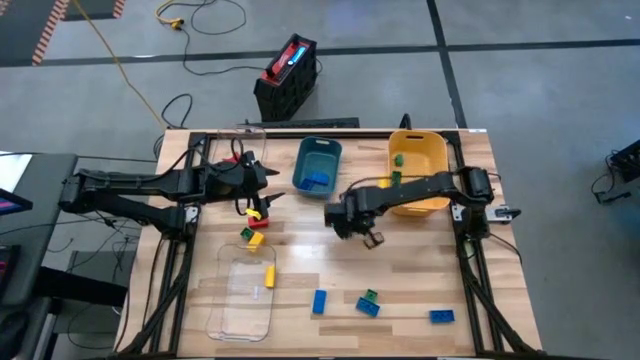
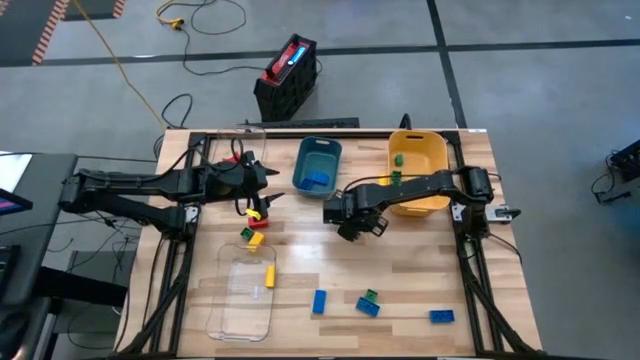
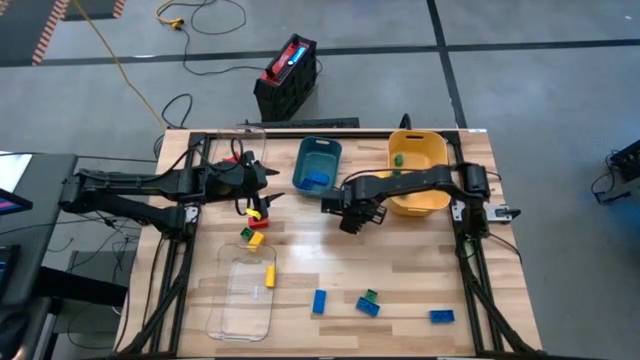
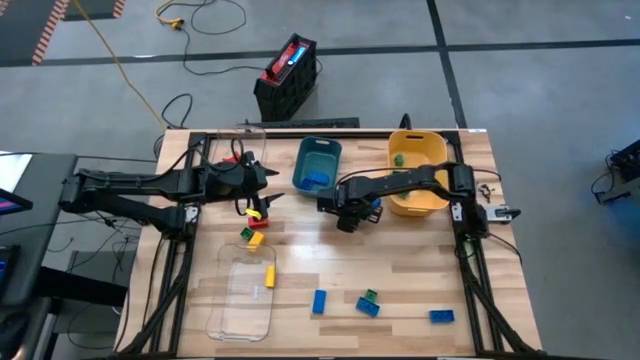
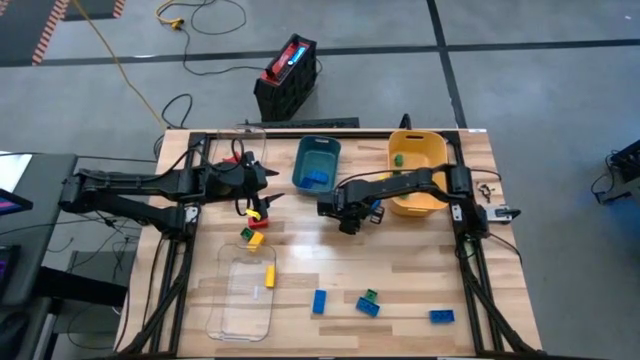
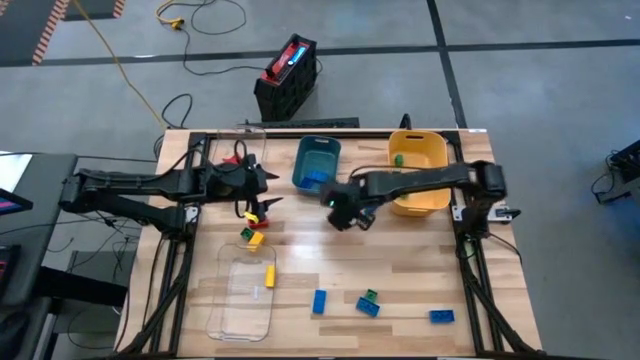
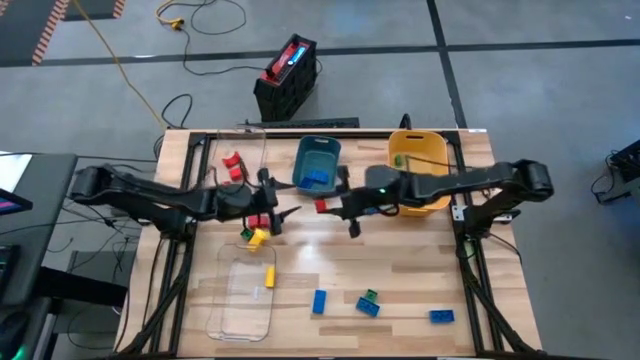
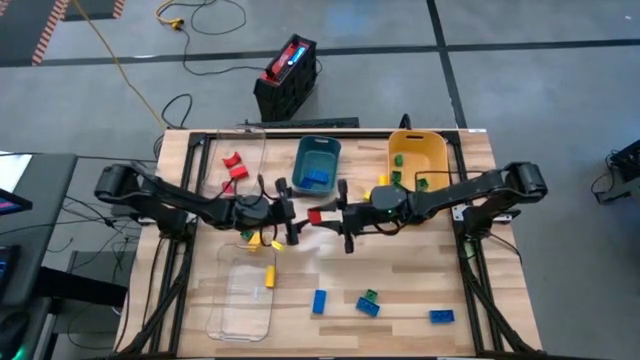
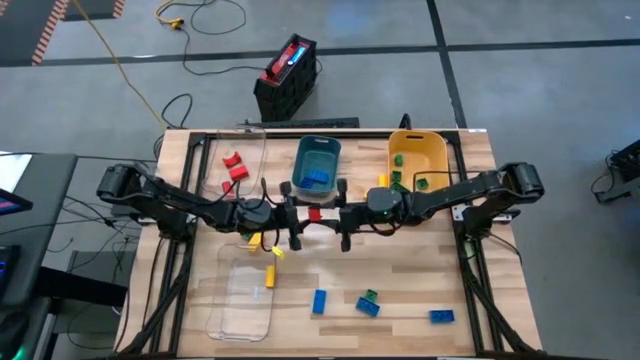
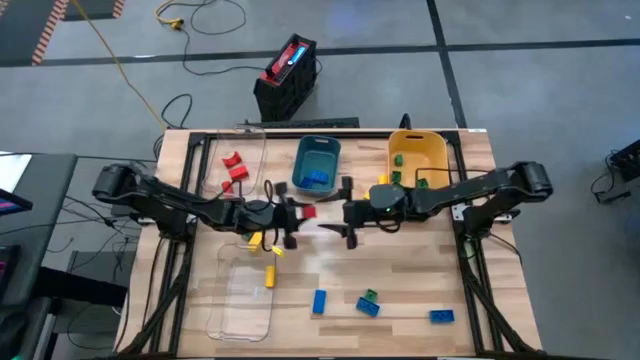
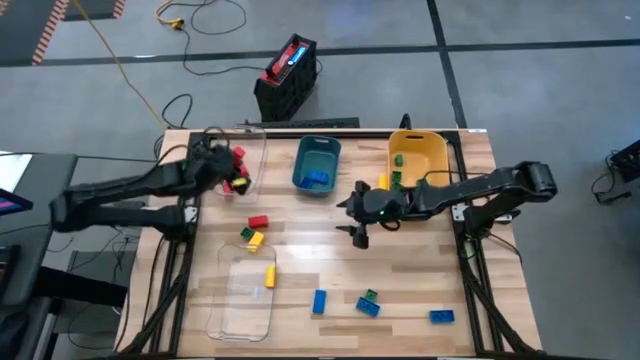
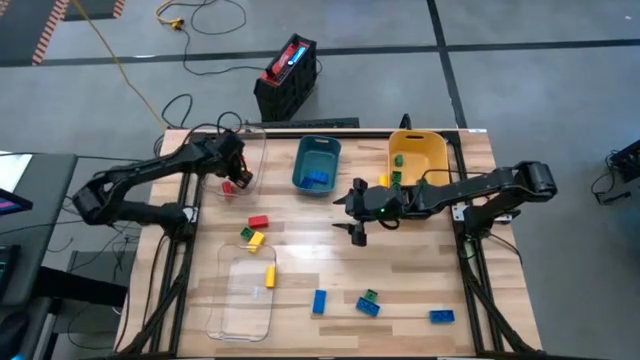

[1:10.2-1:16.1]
Task: Sort blocks
Put the red block into the top transparent bin

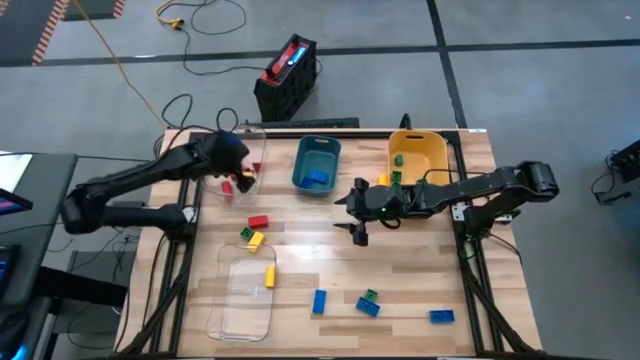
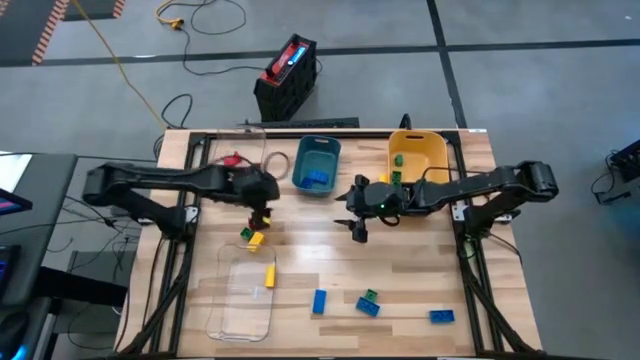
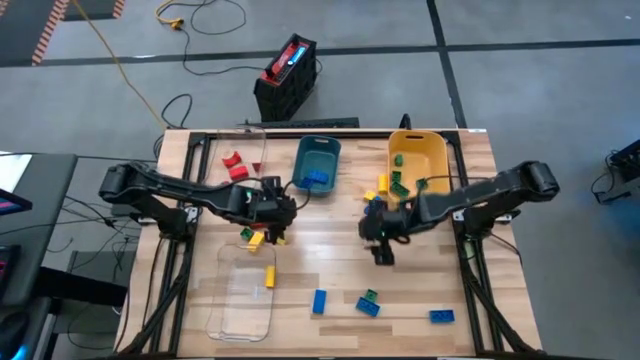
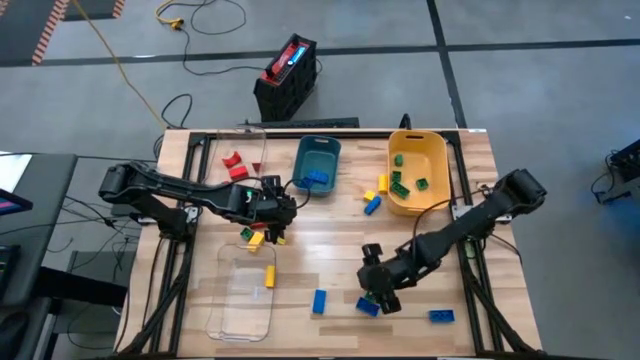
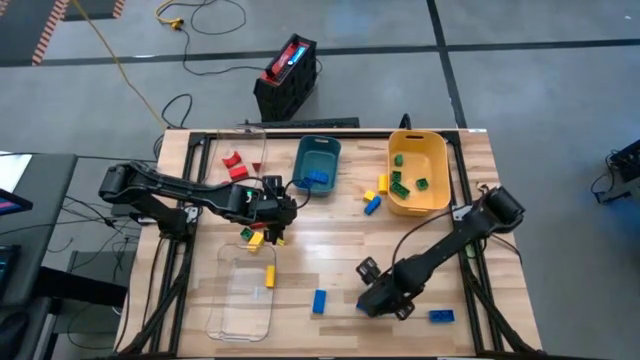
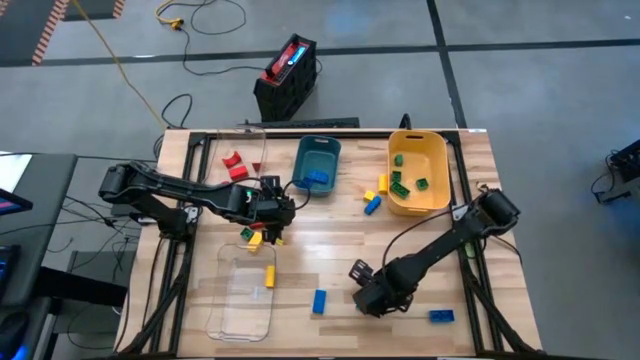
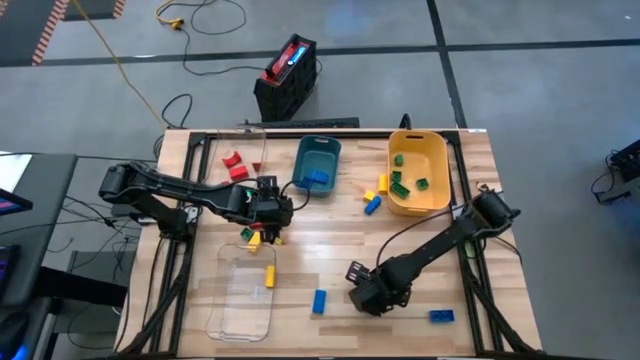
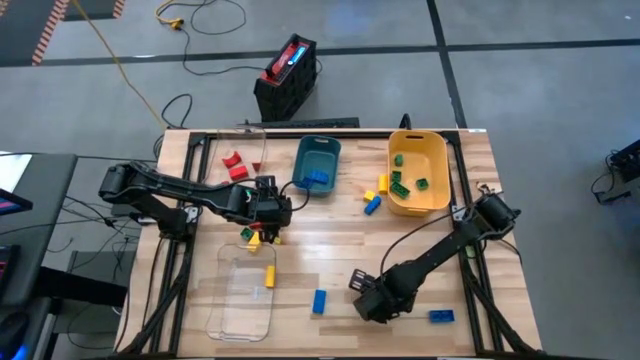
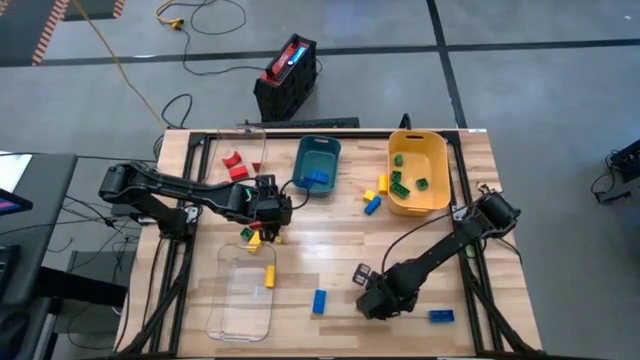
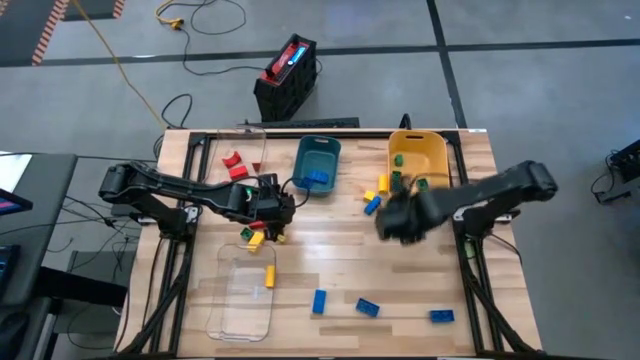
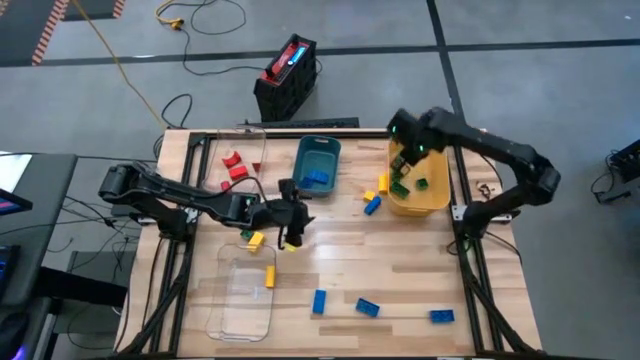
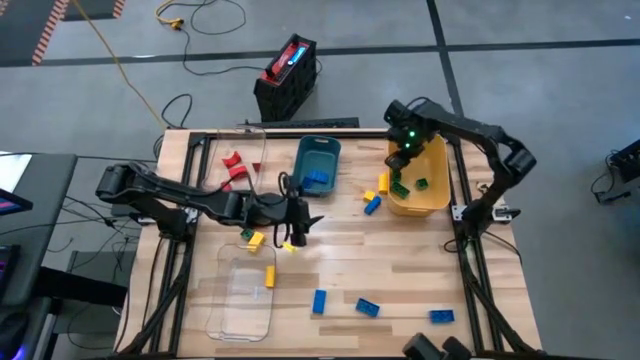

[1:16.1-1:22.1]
Put the green game piece into the yellow bin

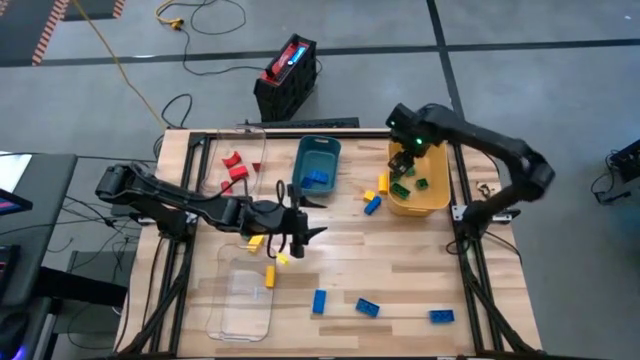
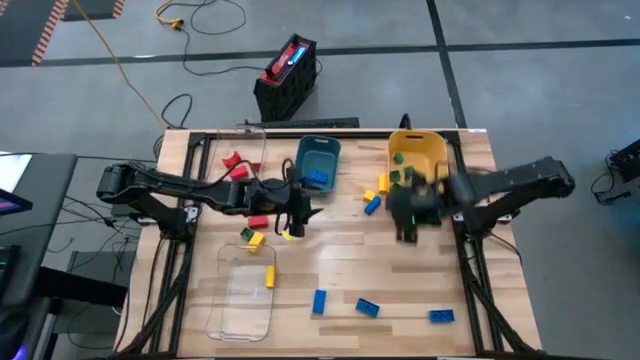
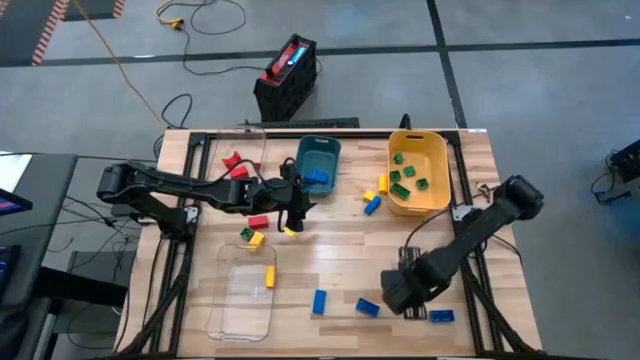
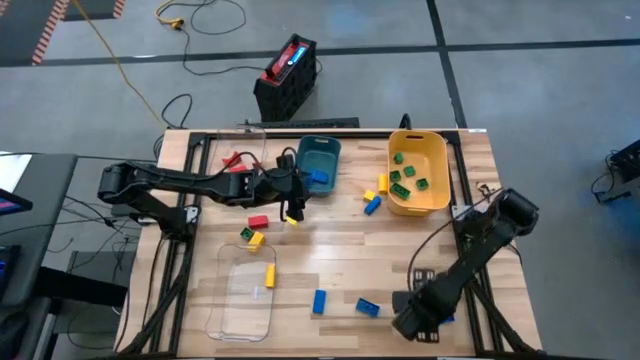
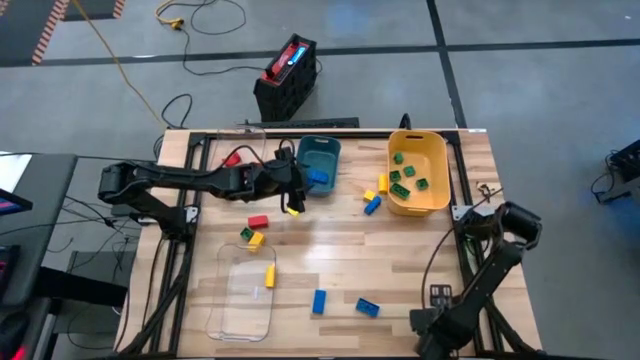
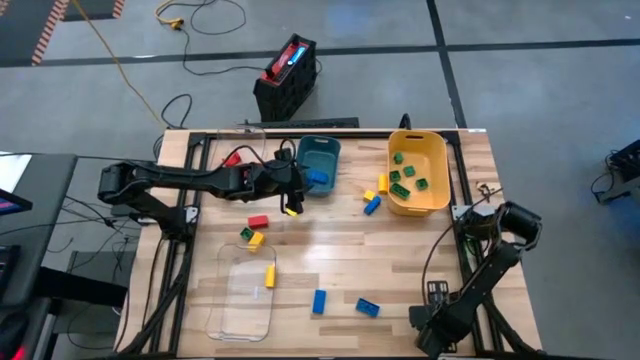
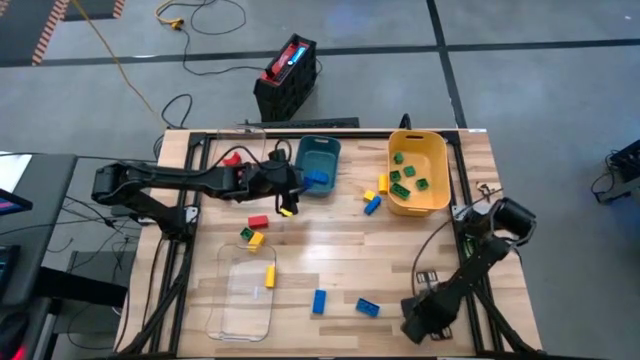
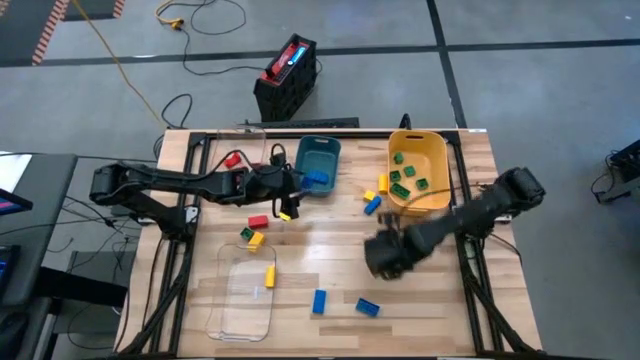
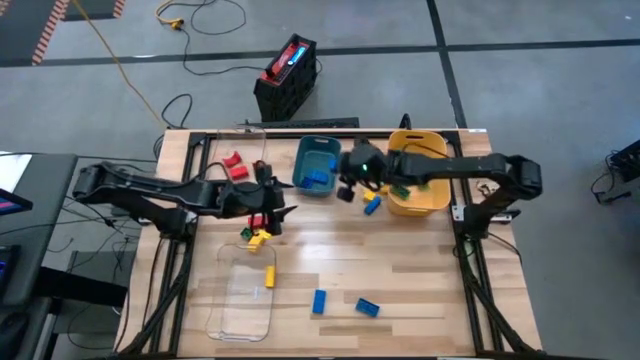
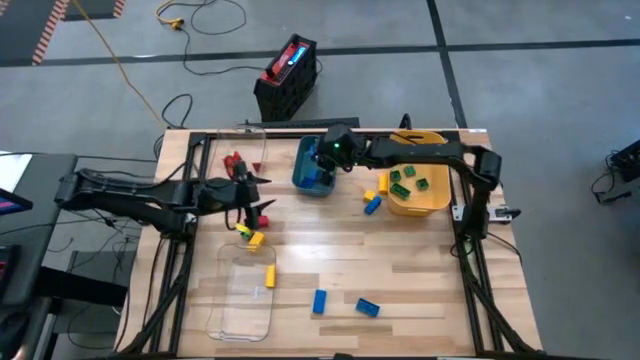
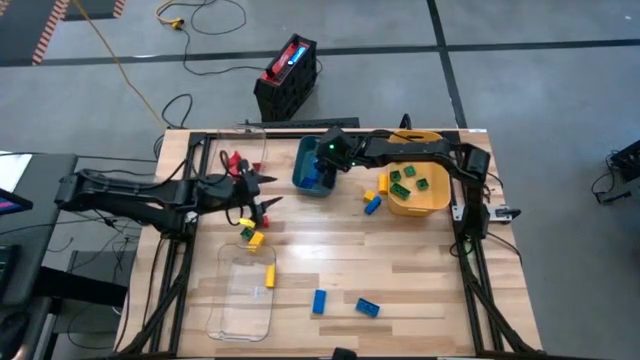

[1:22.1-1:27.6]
Put the blue game piece into the blue bin

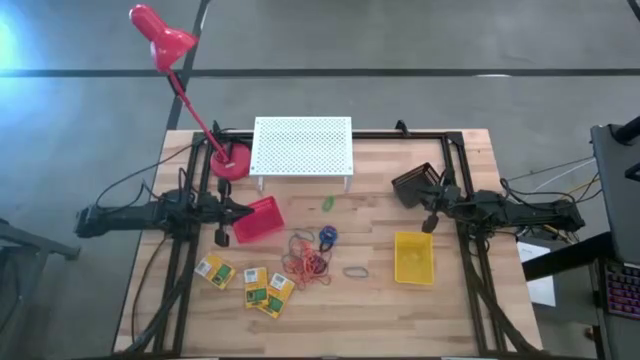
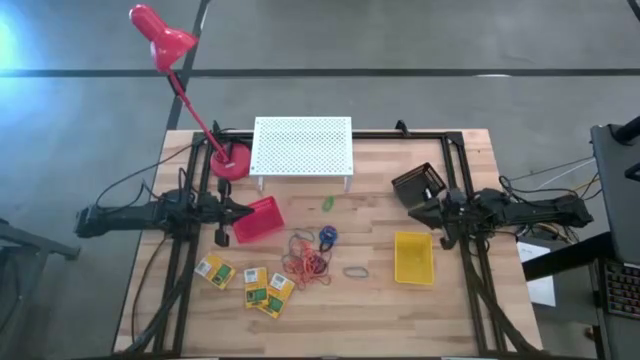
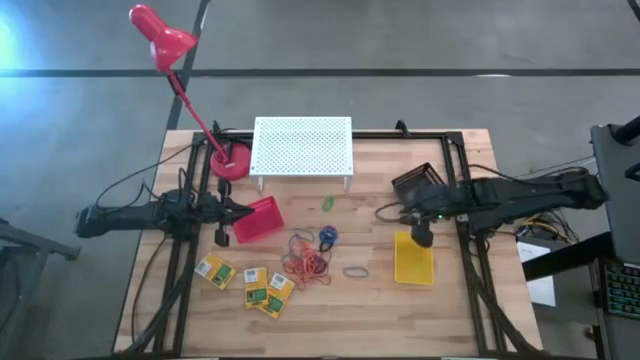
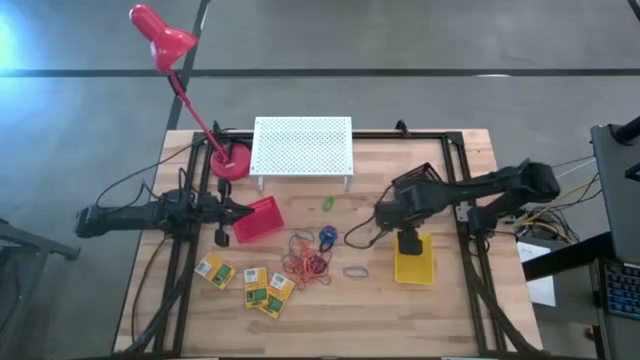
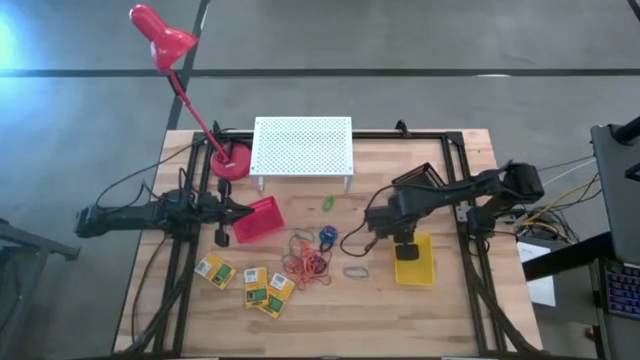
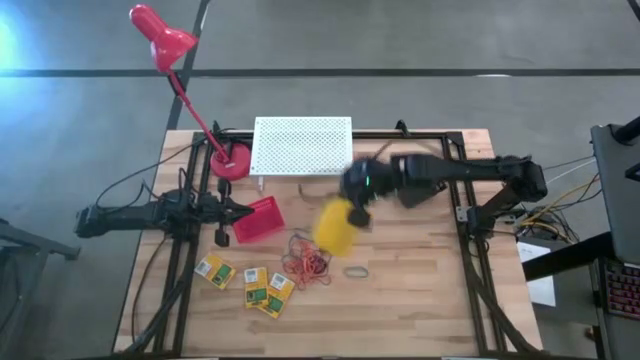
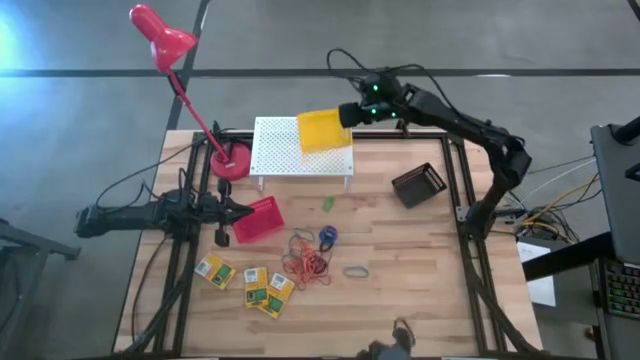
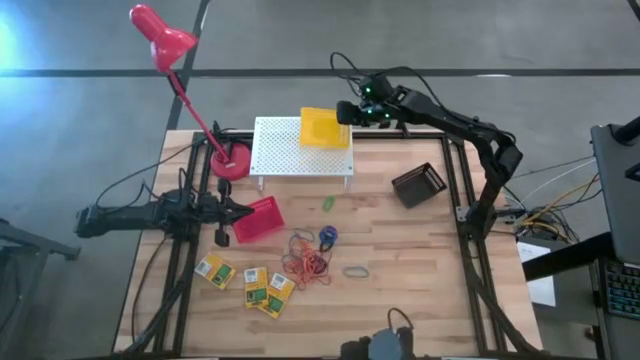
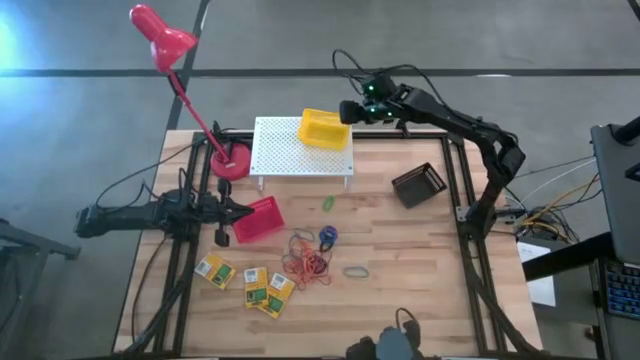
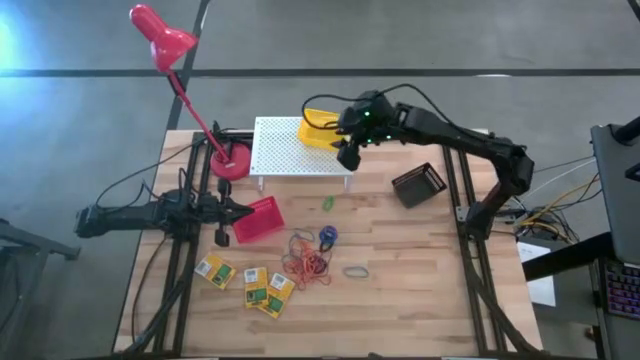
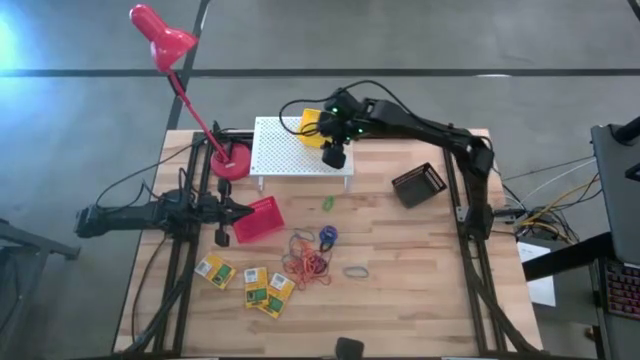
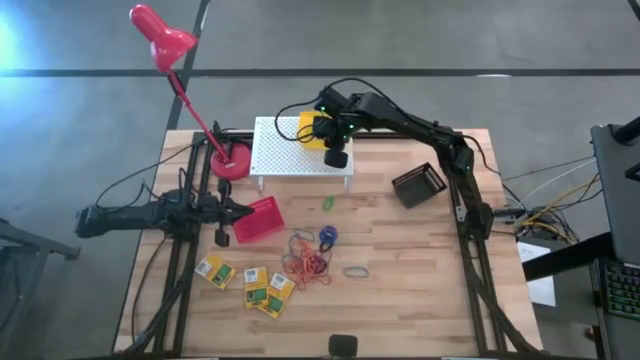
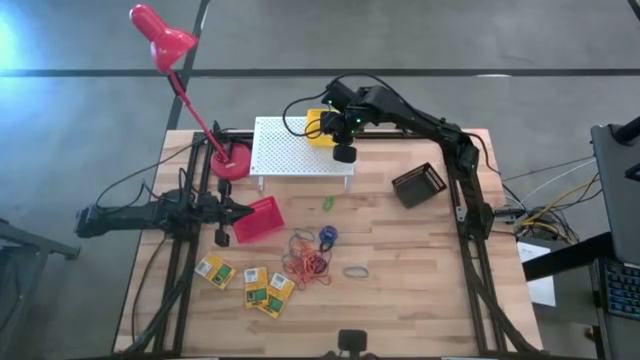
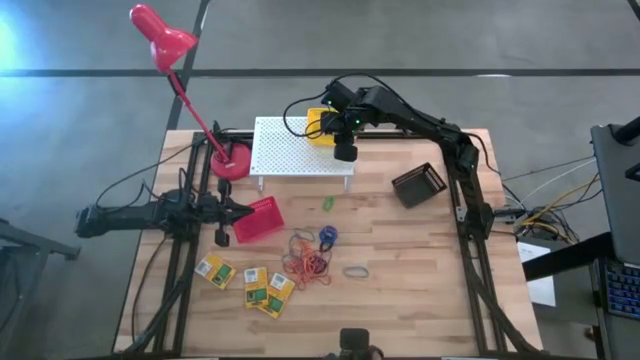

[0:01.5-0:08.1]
Task: Pick & Place Office Desk Supplies
Put the yellow bin on the shelf
